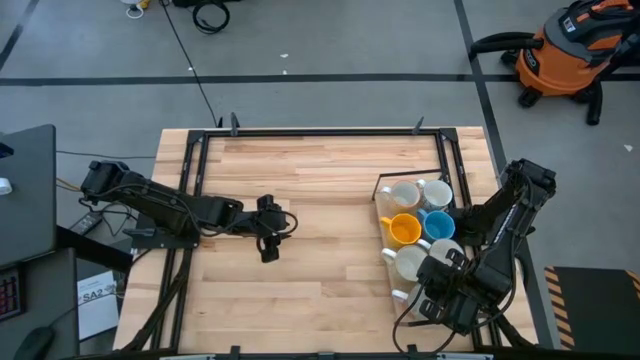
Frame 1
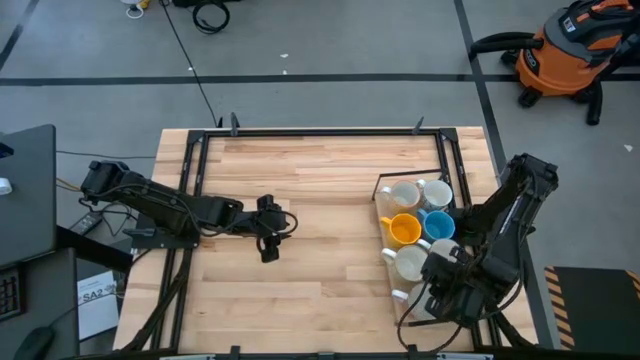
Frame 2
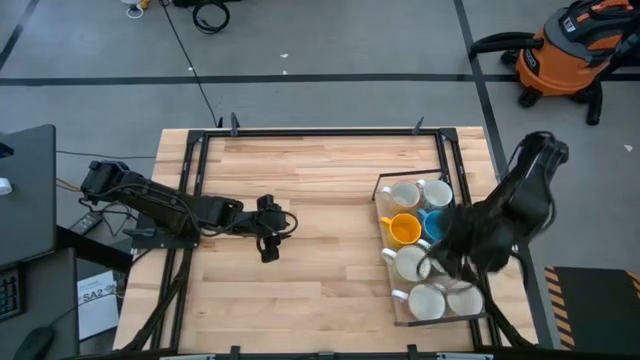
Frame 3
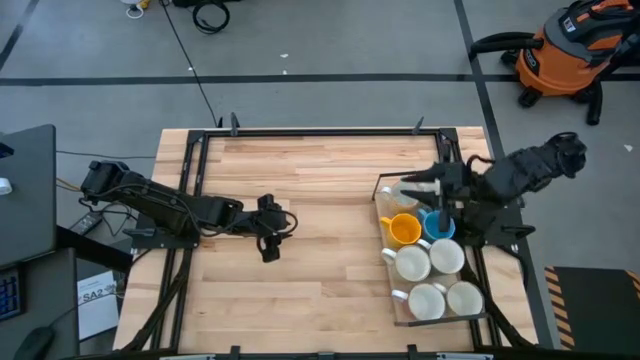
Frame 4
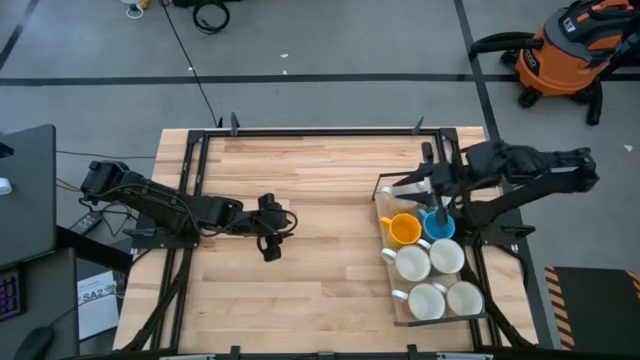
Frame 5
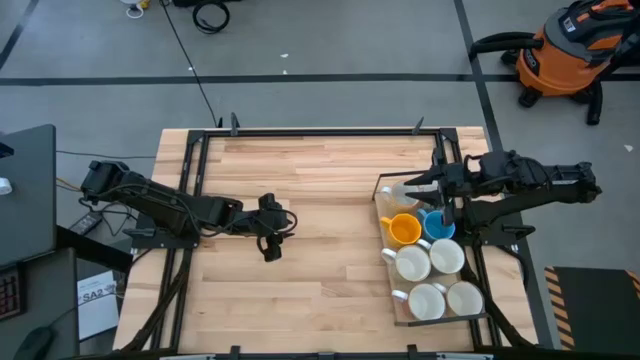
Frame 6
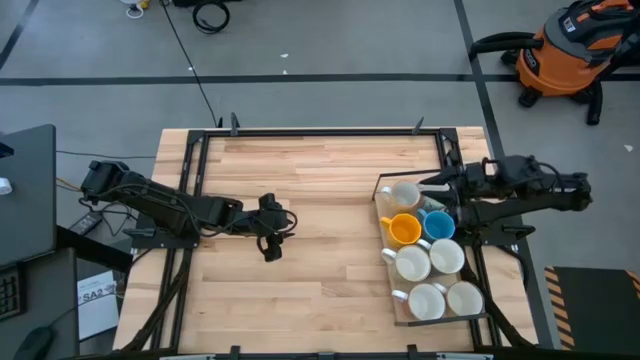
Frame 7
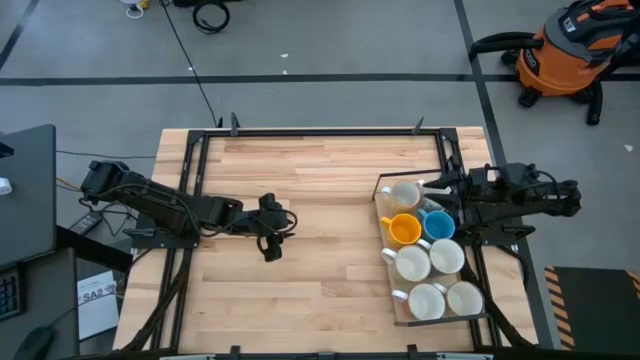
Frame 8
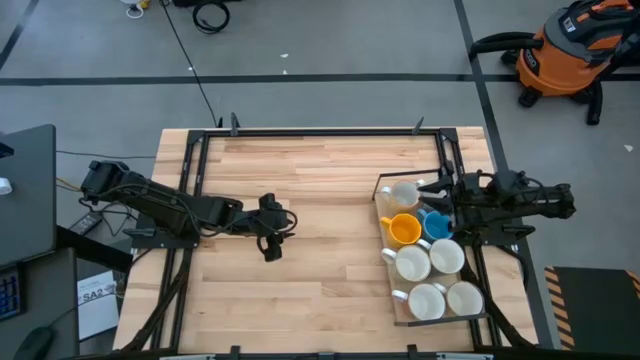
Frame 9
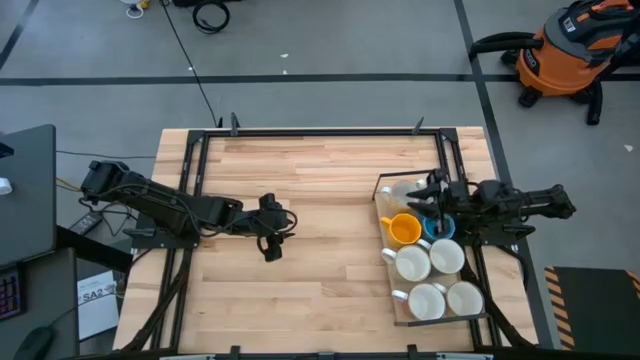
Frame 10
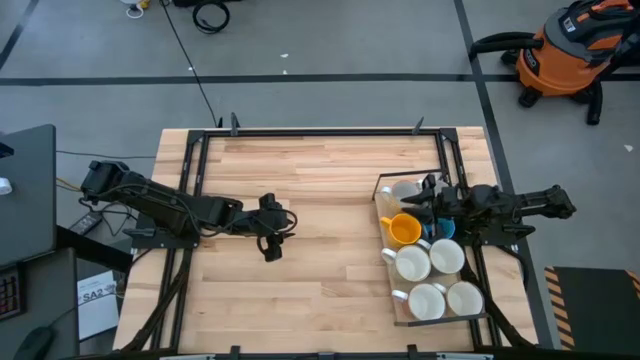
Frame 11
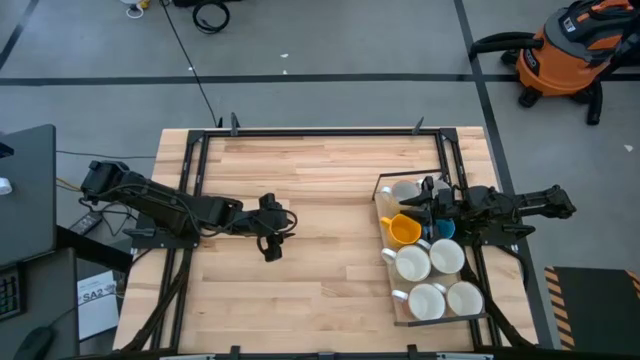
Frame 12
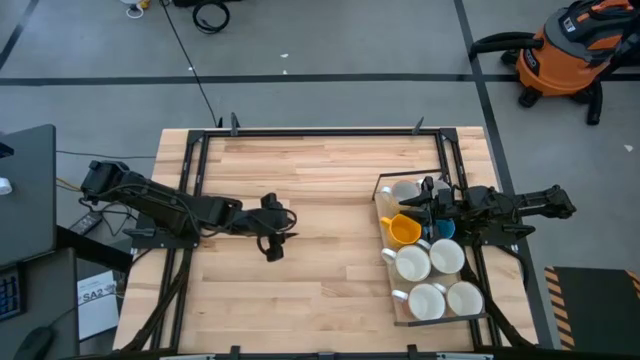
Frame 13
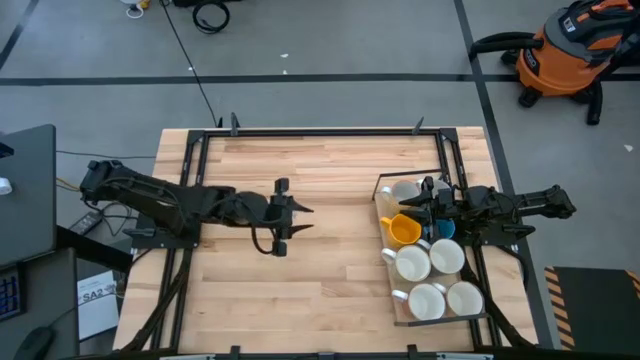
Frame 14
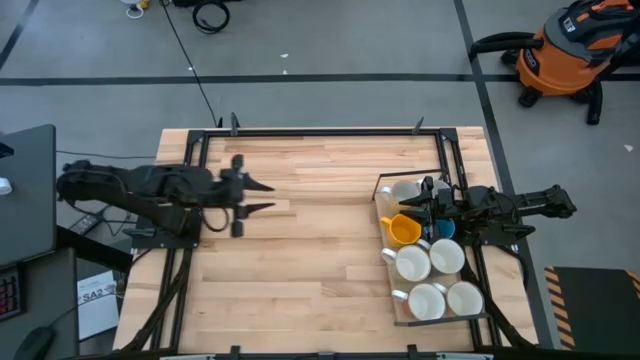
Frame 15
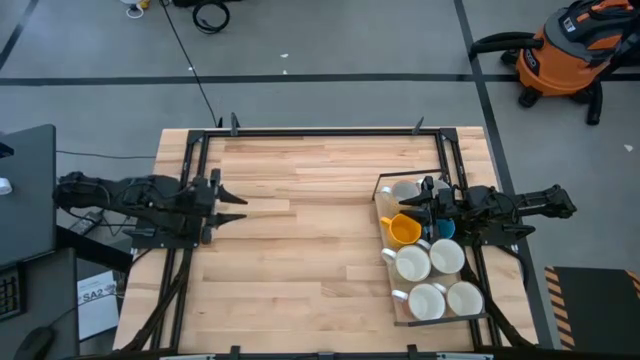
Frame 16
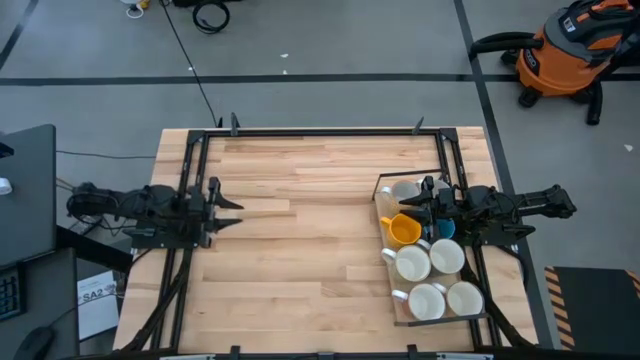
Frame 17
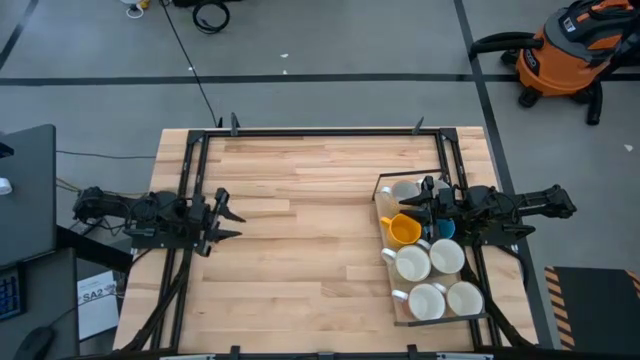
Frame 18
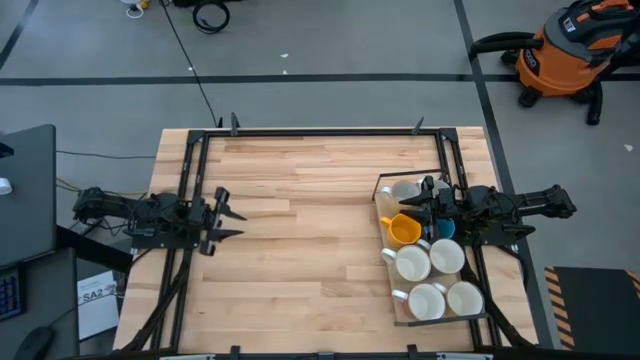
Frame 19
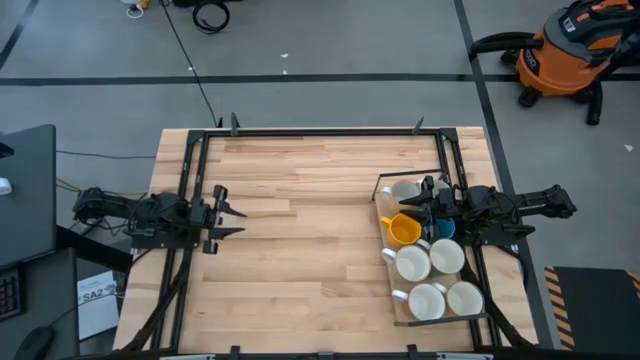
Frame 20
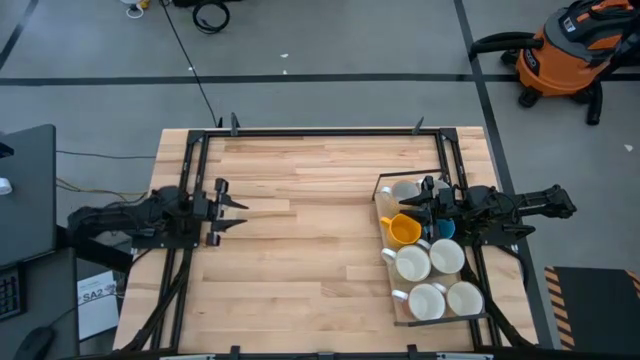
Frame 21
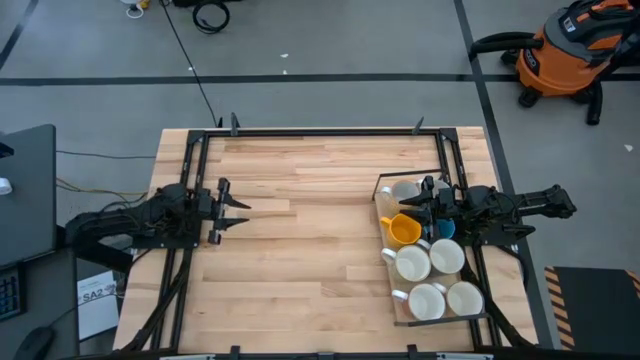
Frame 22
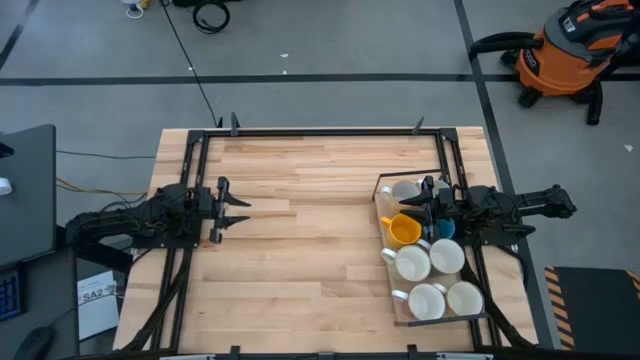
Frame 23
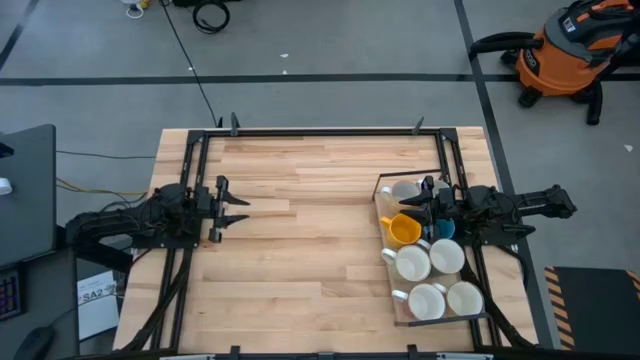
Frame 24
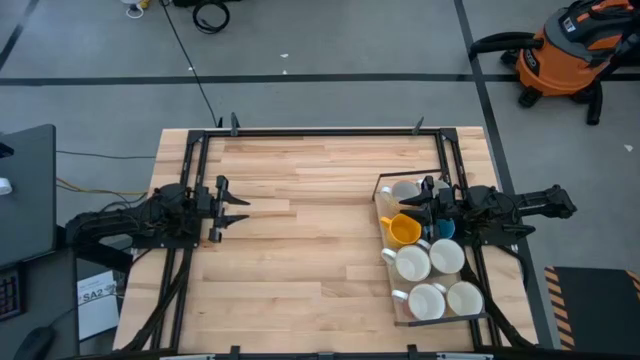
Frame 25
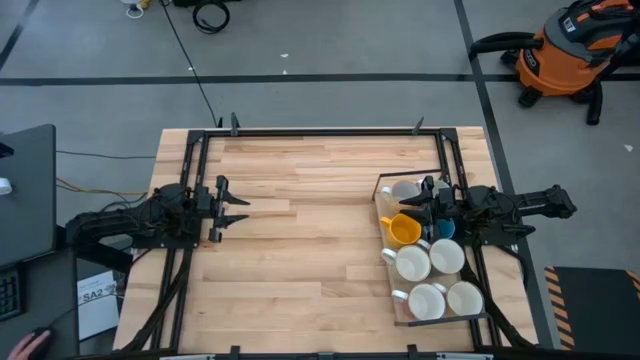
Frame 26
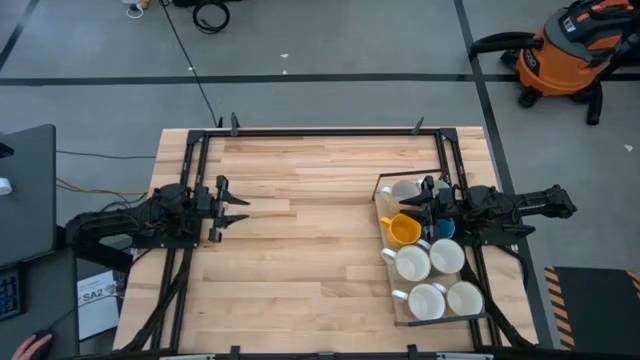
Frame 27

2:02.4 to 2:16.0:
Task: Place coffee mugs
Return to Home Position
